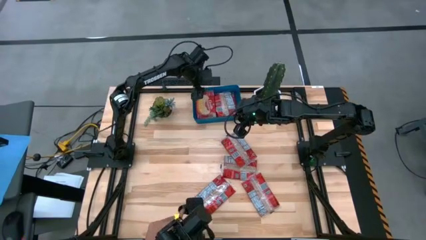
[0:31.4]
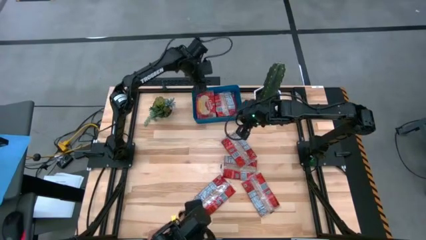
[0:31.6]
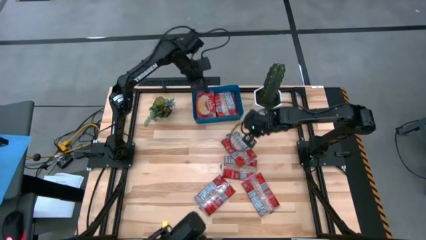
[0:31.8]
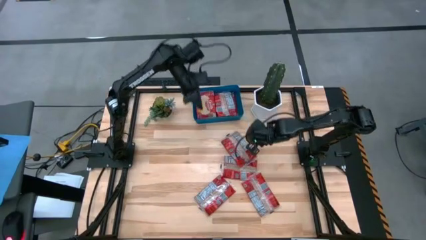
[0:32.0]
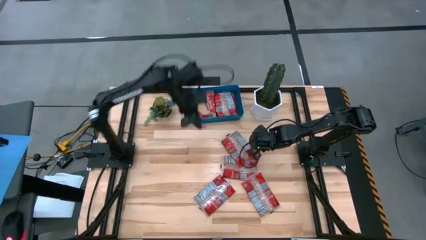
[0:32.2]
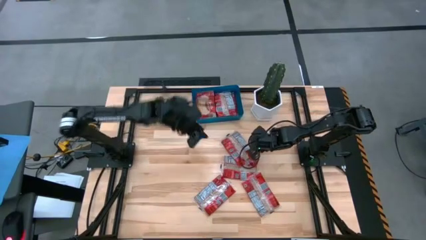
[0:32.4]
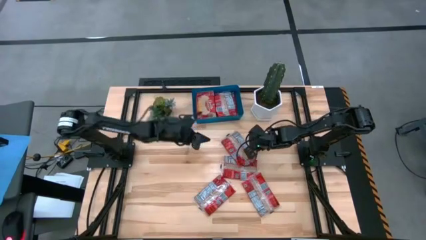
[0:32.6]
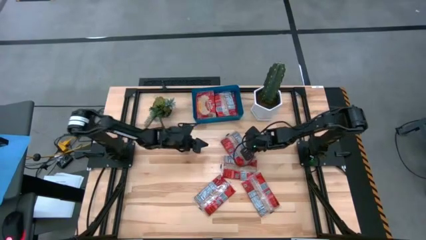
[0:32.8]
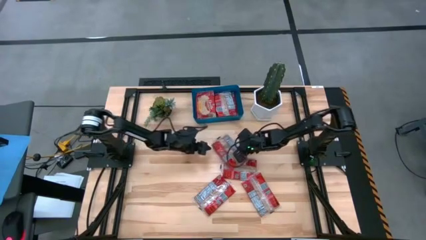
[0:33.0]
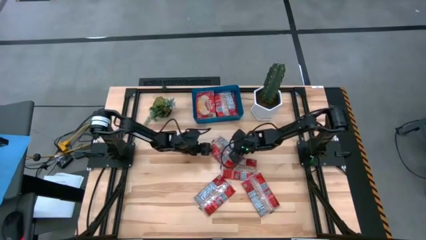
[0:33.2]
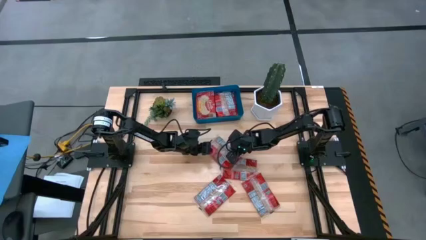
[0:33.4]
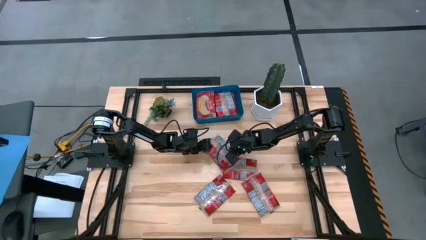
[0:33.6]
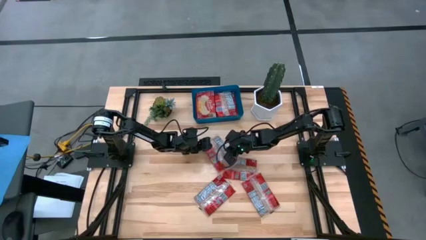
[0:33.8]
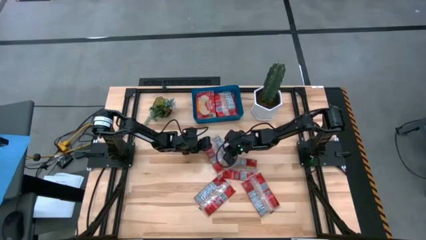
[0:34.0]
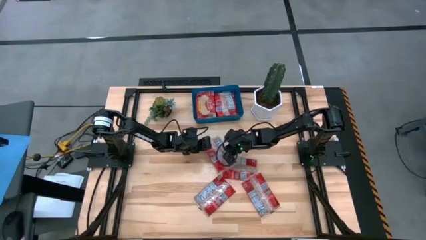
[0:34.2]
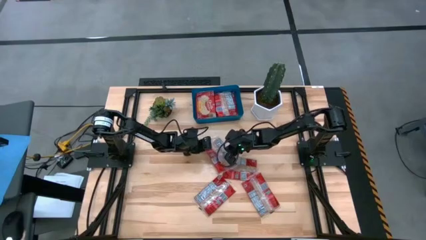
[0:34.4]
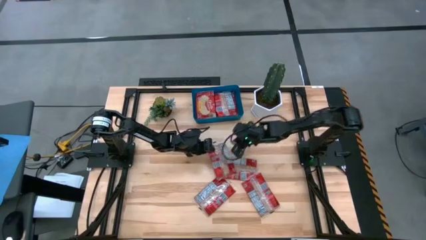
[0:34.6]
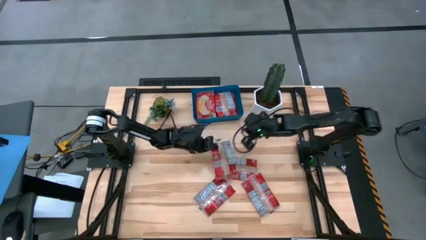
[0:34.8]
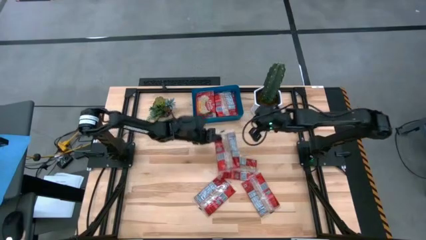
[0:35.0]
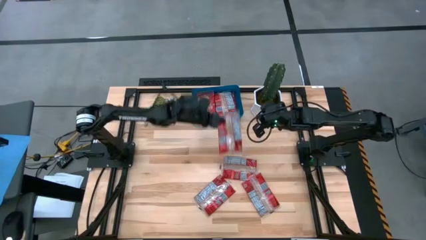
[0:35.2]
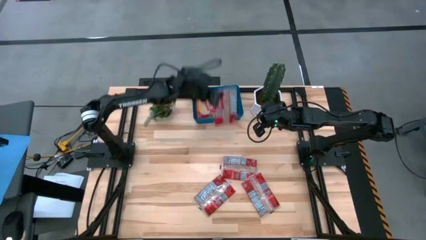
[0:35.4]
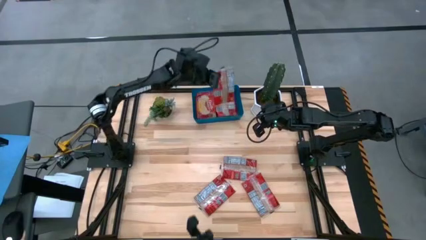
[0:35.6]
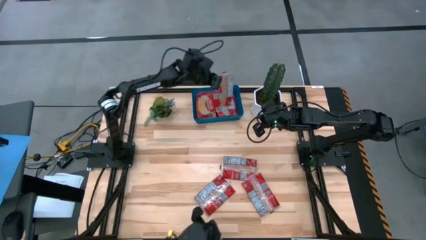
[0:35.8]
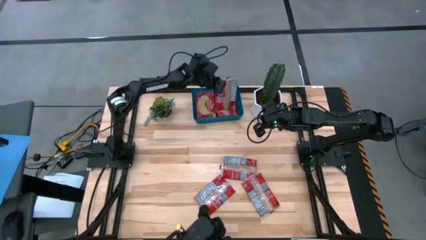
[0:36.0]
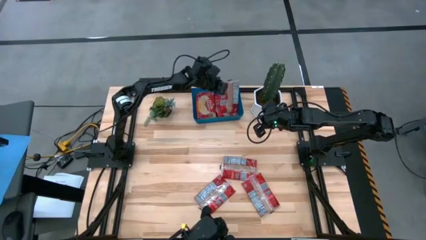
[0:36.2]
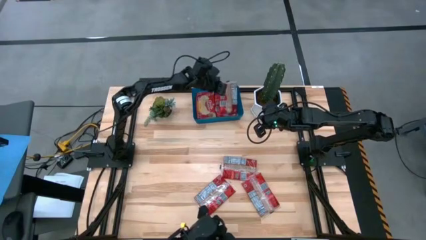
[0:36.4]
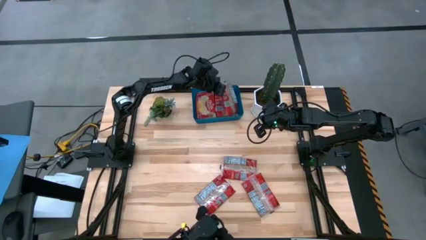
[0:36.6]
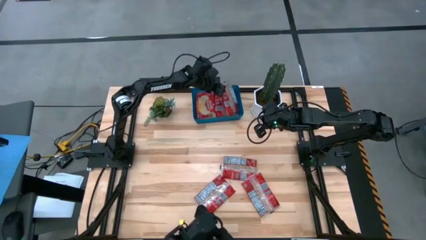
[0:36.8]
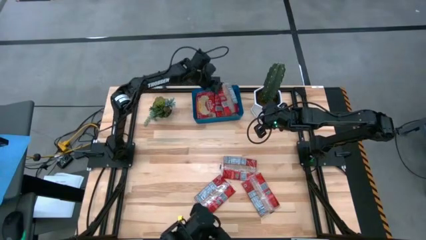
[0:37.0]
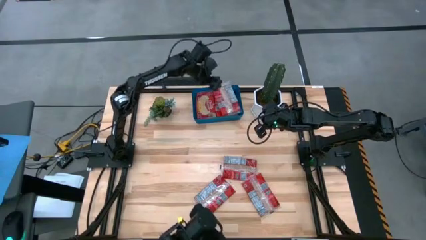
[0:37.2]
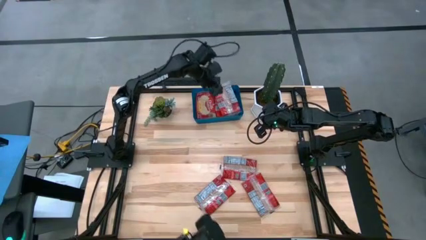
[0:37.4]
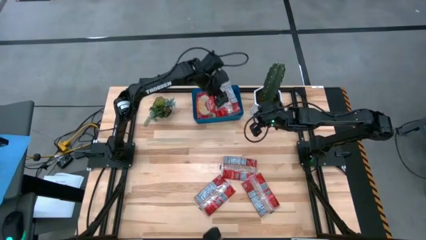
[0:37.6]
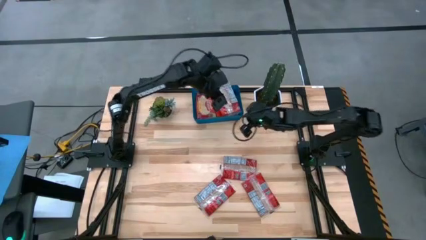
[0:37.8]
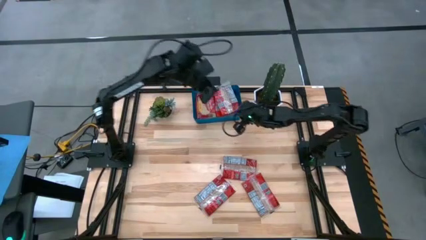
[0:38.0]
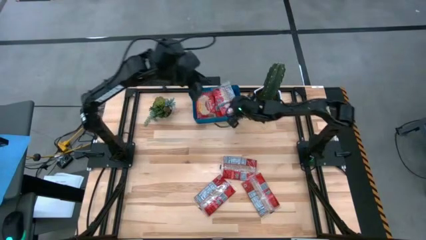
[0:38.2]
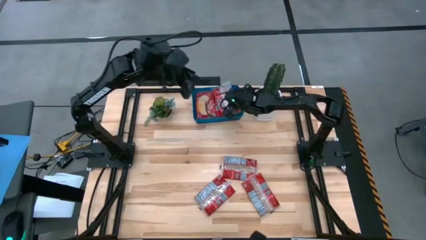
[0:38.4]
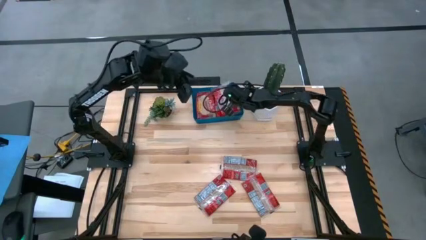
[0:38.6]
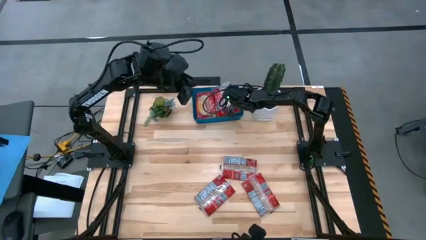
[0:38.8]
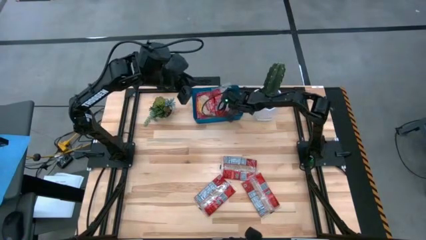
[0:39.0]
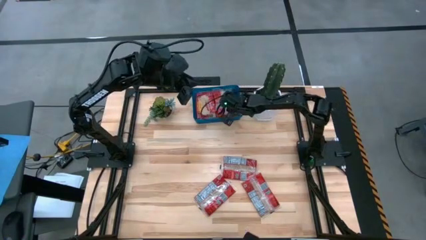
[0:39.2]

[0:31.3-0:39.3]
Task: Sort popcorn bags into baskets
Put the popcorn bag into the blue bin

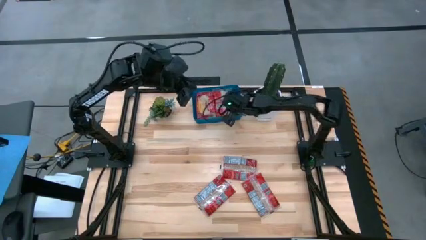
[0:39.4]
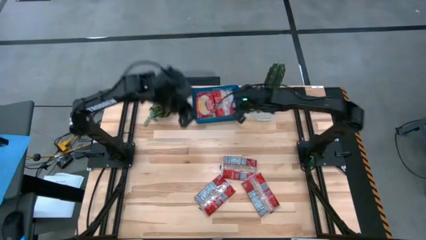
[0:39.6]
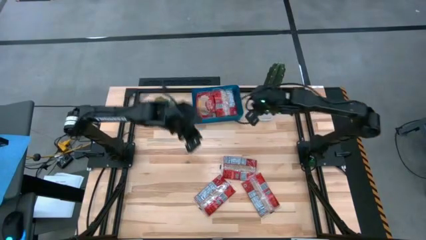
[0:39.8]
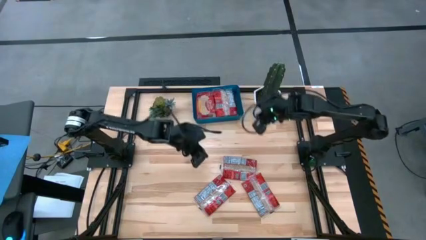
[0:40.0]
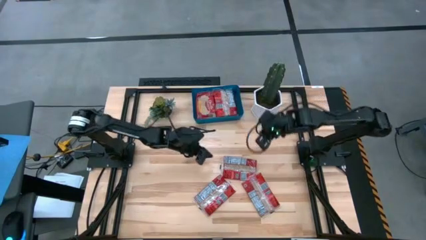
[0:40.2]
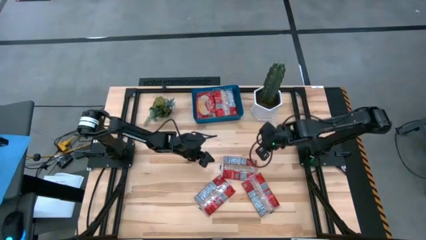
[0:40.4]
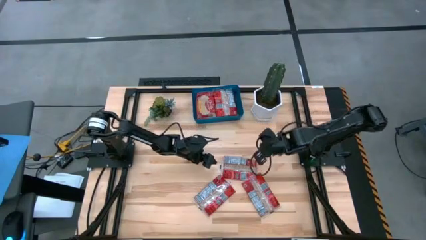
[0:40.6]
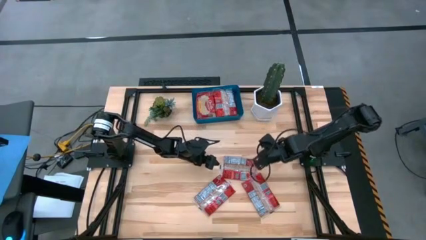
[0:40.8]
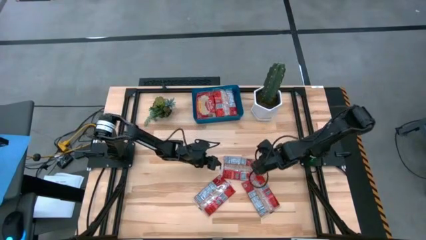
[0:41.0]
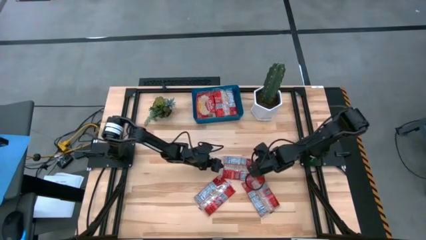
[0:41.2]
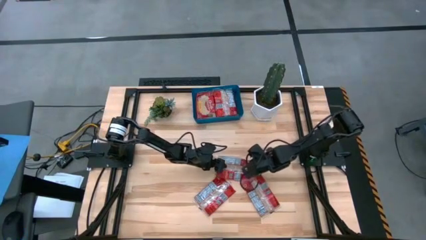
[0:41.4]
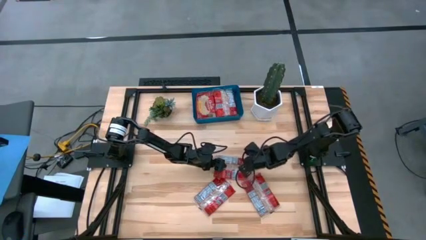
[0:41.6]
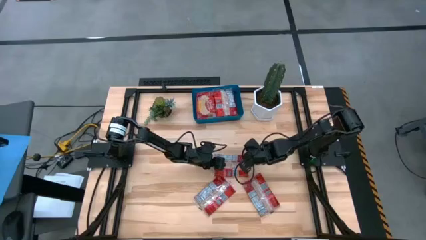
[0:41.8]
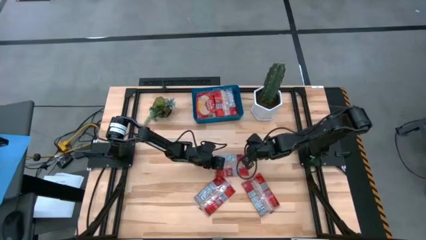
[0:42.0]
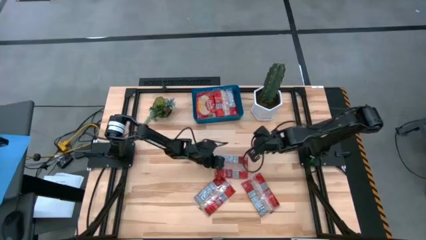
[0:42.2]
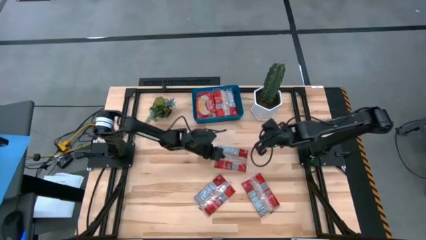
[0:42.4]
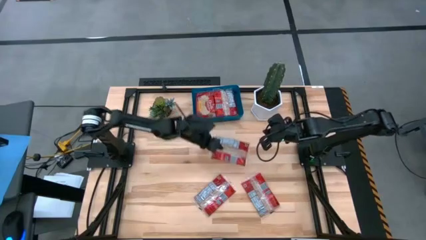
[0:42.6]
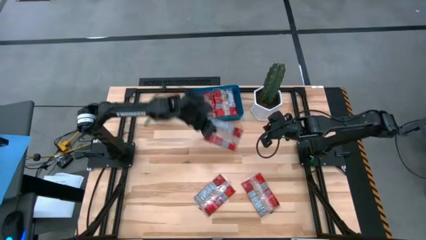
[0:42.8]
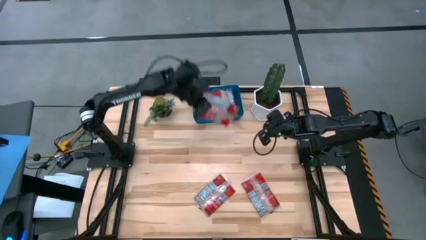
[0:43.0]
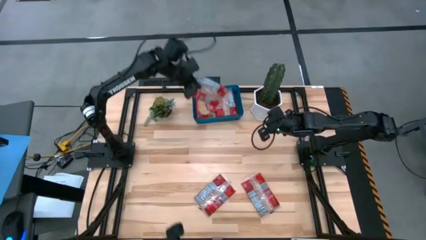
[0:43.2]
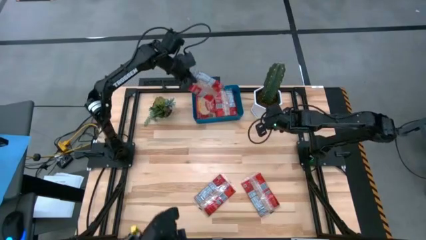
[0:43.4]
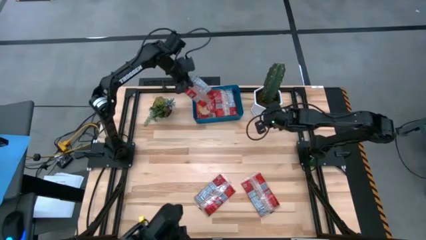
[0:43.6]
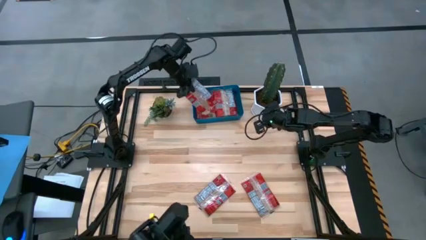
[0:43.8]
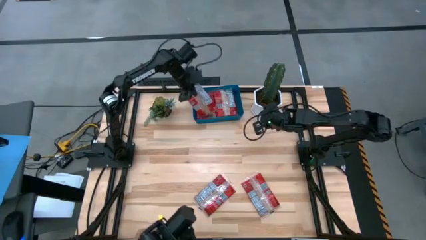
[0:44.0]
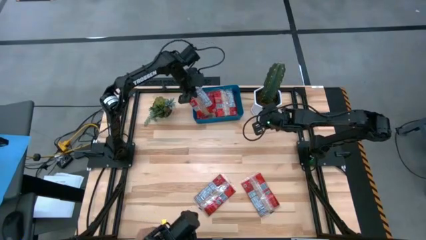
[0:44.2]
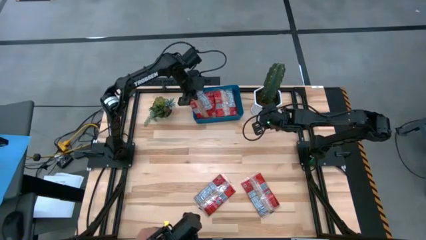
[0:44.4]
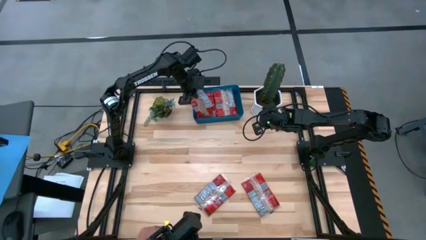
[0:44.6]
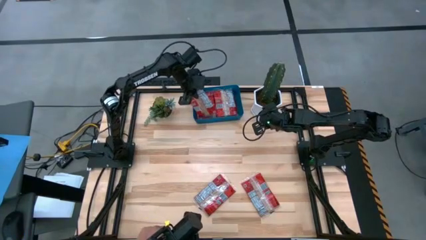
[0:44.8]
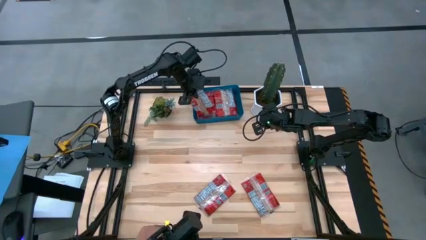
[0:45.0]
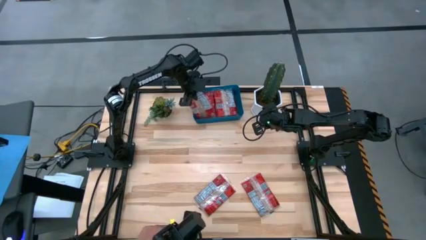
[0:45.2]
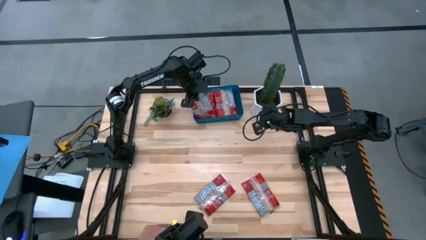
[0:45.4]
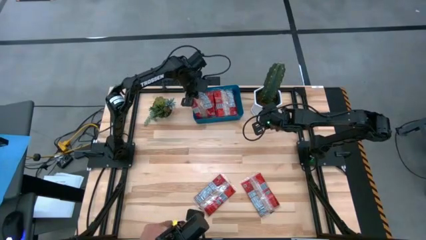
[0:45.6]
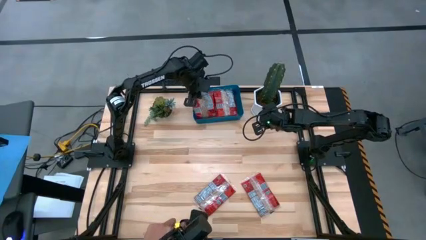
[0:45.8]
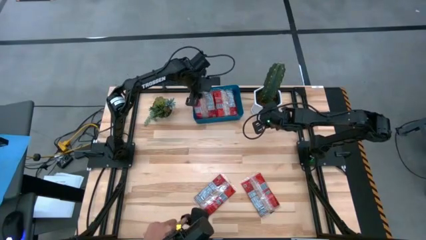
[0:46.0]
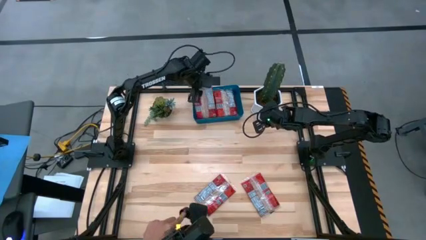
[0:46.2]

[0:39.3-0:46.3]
Put the top popcorn bag into the blue bin

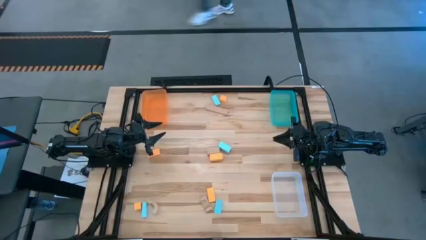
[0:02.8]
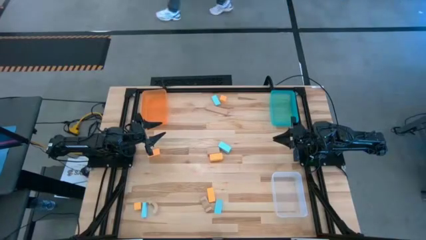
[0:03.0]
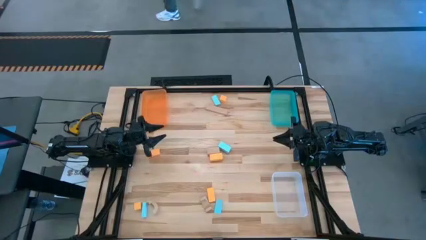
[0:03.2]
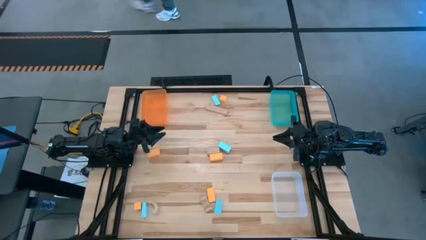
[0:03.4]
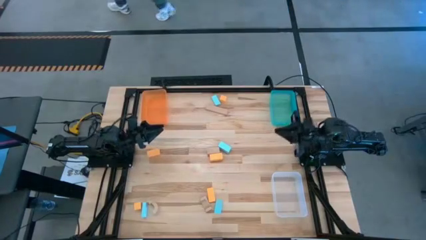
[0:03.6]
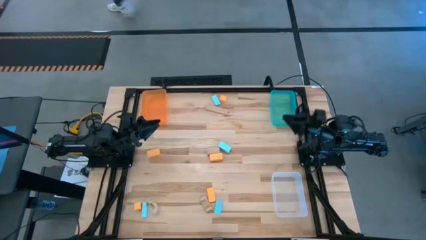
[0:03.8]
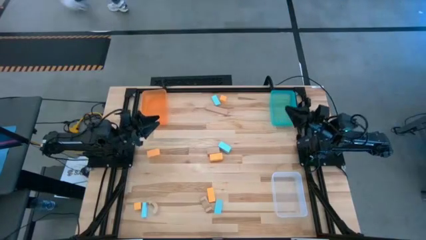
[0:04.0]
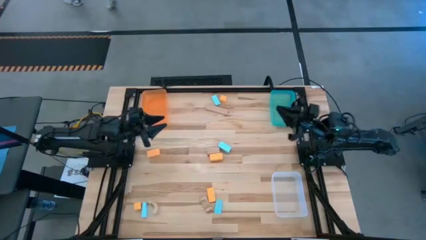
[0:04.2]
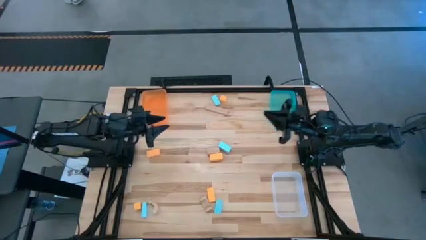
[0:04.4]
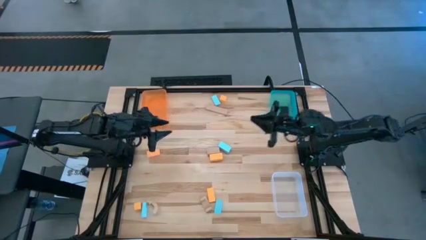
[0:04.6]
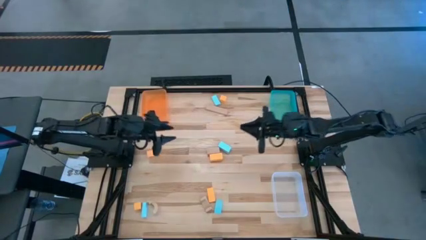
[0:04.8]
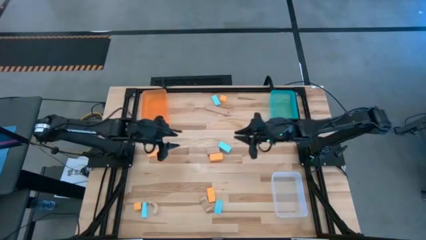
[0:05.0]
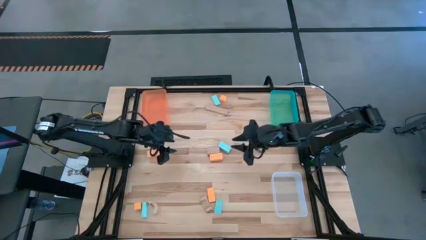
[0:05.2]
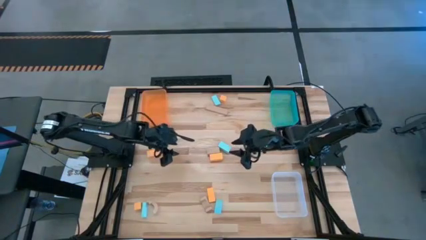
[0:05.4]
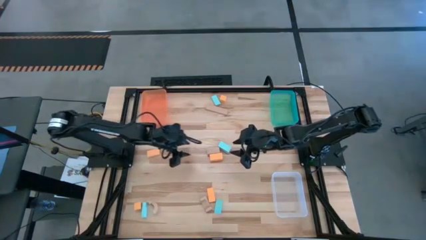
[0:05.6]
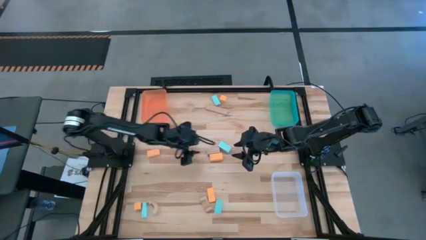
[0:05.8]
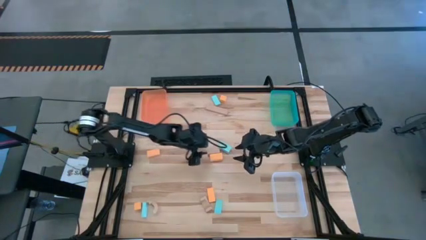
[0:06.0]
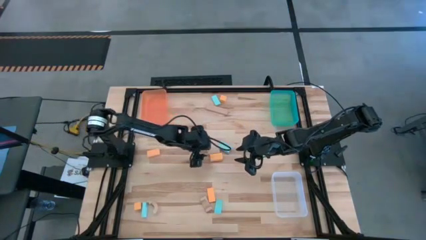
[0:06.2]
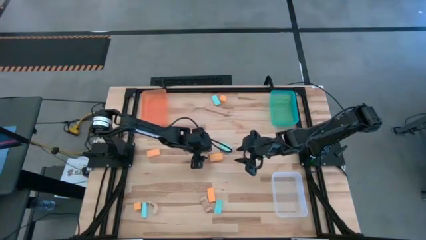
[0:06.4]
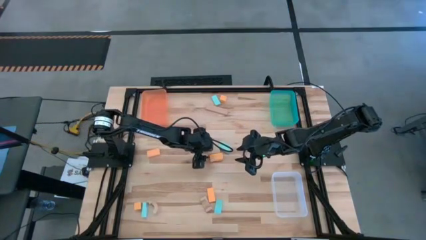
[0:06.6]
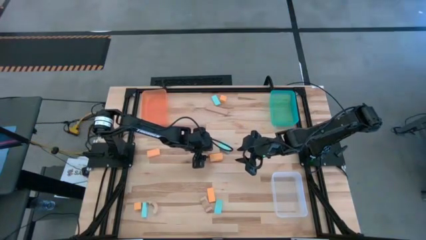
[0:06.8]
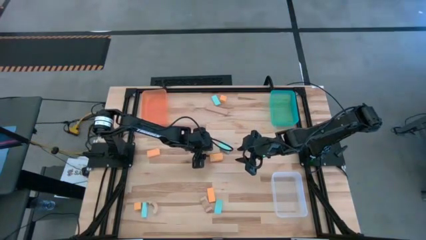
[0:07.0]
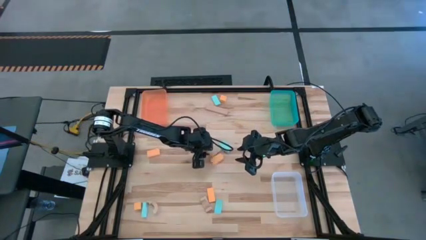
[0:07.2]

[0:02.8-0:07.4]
Task: Sort & place blocks by color
Put the brown block into the orange bin
